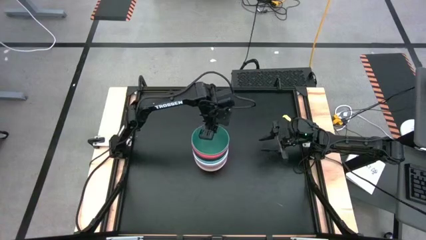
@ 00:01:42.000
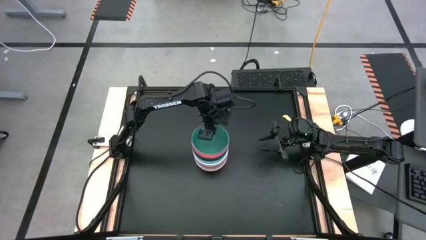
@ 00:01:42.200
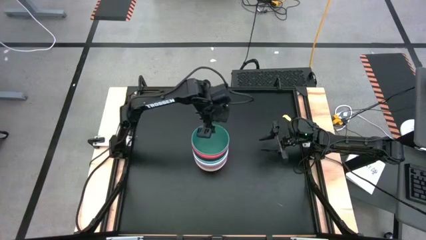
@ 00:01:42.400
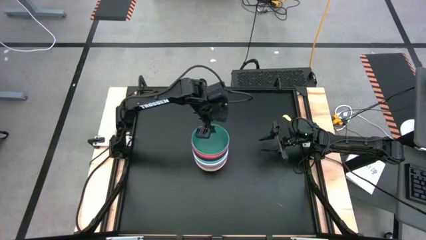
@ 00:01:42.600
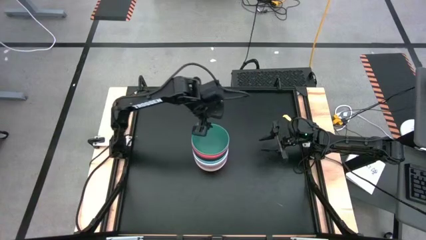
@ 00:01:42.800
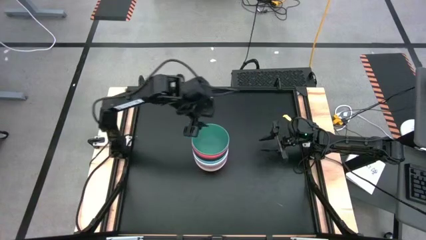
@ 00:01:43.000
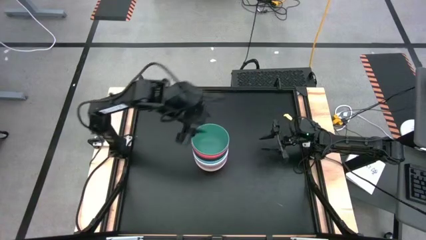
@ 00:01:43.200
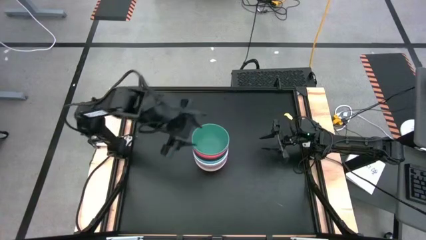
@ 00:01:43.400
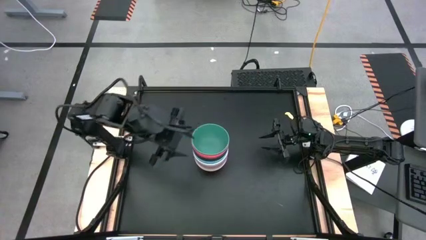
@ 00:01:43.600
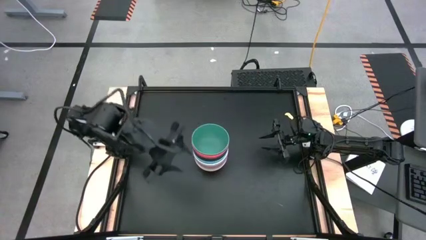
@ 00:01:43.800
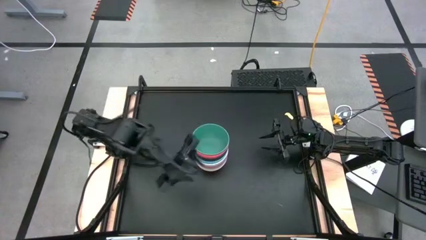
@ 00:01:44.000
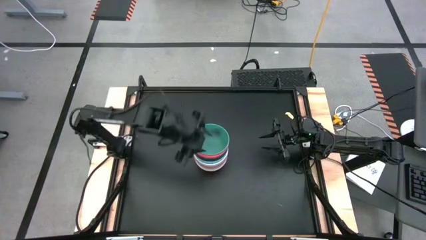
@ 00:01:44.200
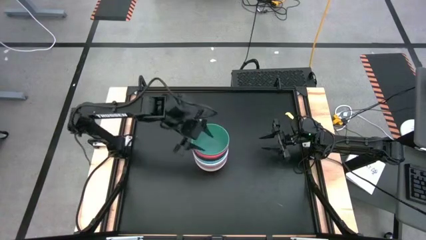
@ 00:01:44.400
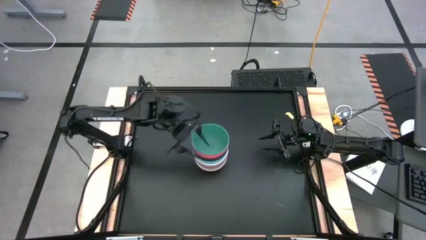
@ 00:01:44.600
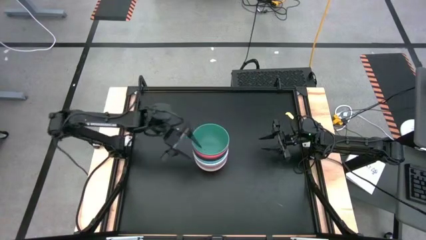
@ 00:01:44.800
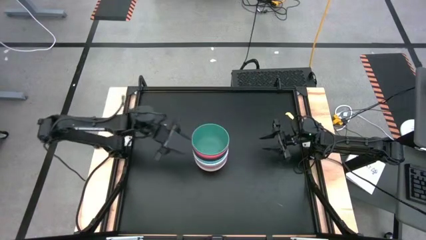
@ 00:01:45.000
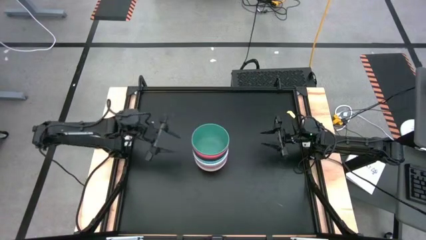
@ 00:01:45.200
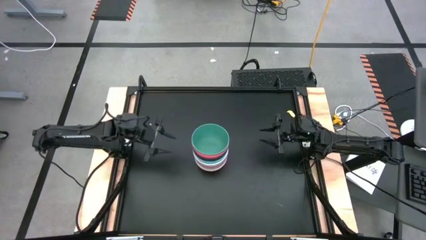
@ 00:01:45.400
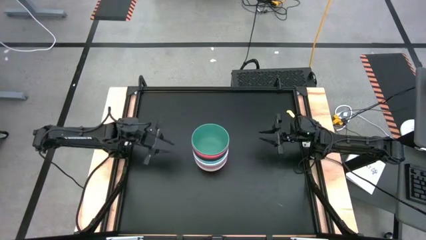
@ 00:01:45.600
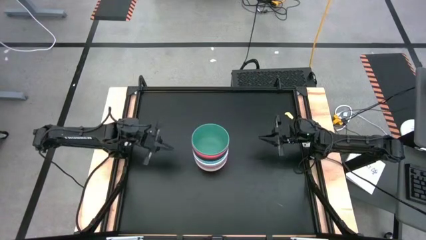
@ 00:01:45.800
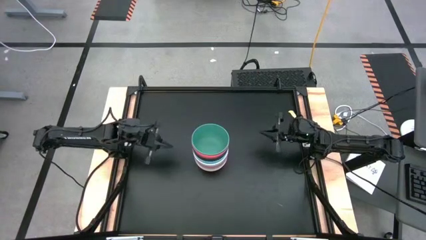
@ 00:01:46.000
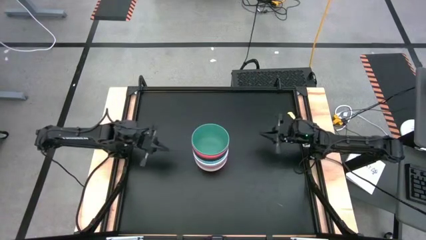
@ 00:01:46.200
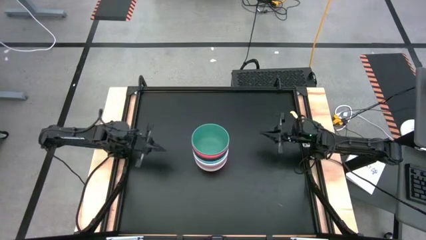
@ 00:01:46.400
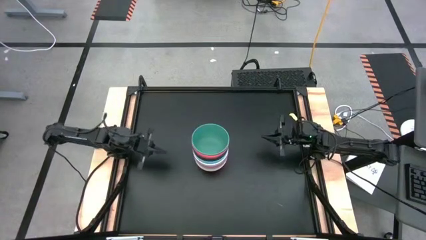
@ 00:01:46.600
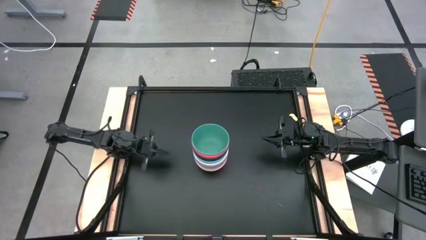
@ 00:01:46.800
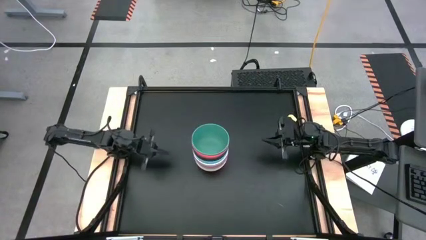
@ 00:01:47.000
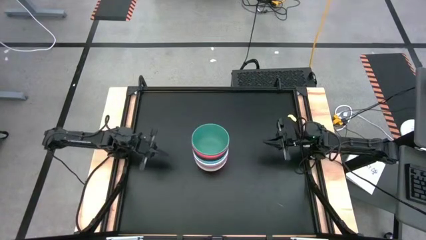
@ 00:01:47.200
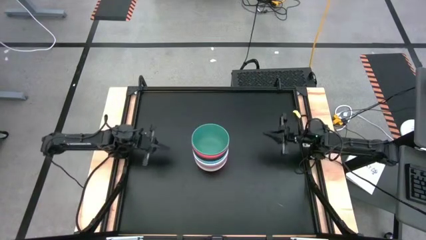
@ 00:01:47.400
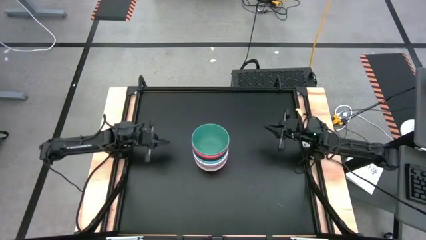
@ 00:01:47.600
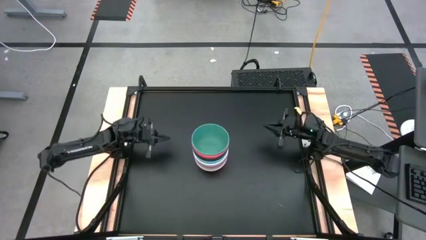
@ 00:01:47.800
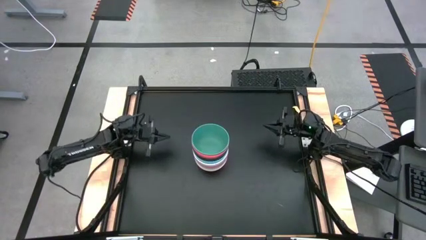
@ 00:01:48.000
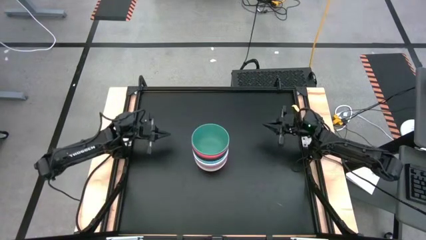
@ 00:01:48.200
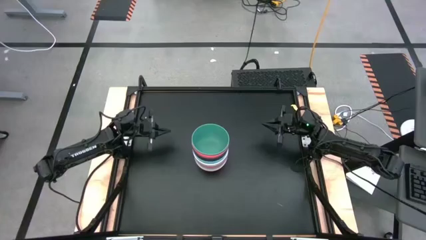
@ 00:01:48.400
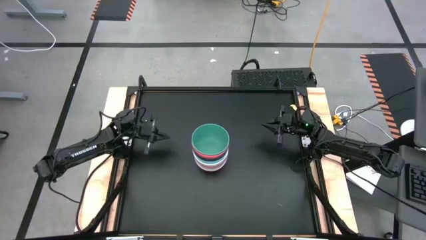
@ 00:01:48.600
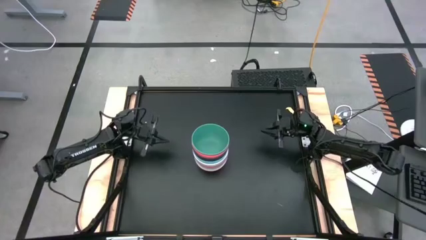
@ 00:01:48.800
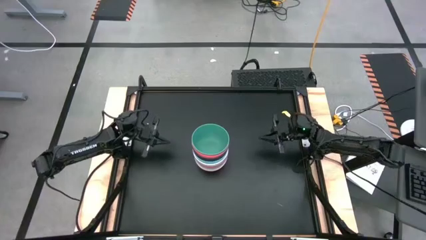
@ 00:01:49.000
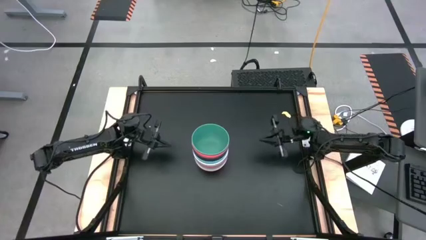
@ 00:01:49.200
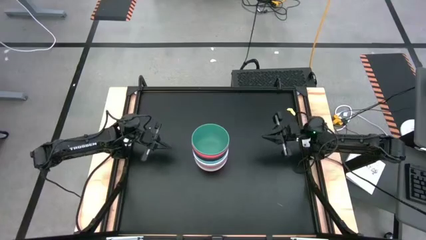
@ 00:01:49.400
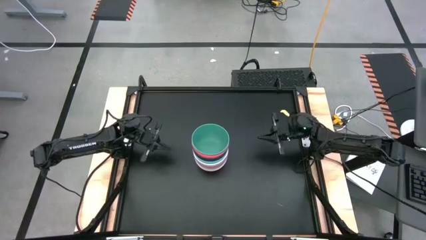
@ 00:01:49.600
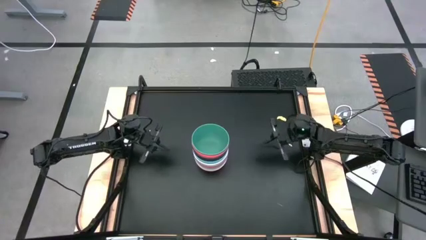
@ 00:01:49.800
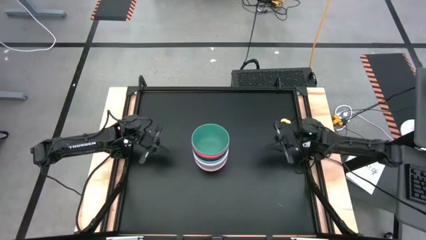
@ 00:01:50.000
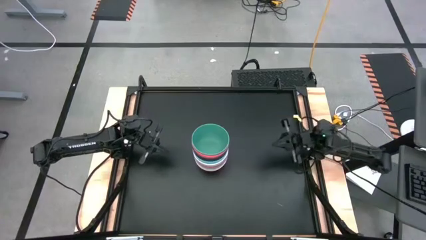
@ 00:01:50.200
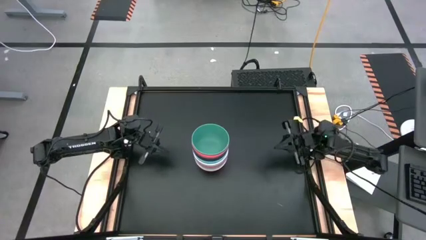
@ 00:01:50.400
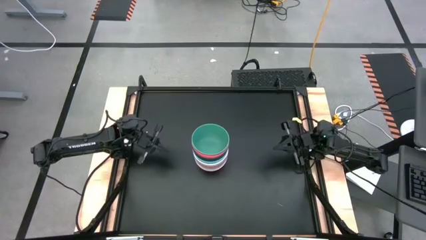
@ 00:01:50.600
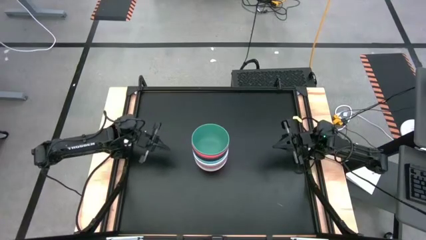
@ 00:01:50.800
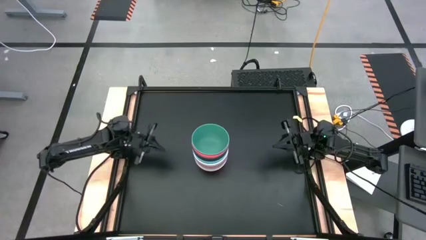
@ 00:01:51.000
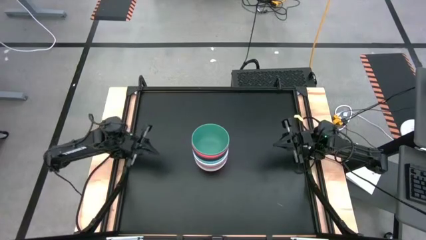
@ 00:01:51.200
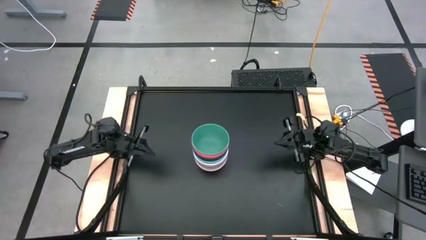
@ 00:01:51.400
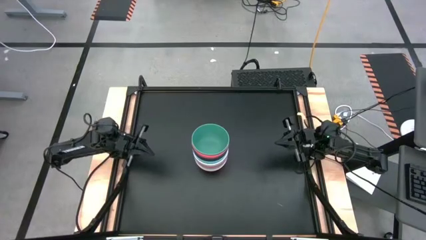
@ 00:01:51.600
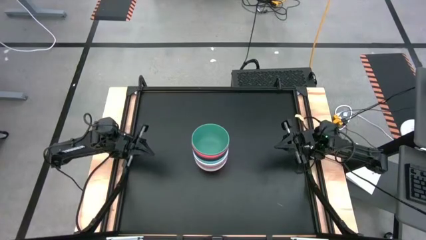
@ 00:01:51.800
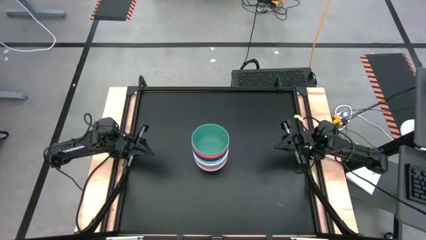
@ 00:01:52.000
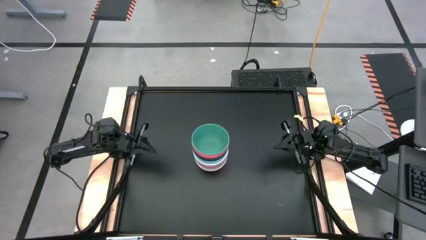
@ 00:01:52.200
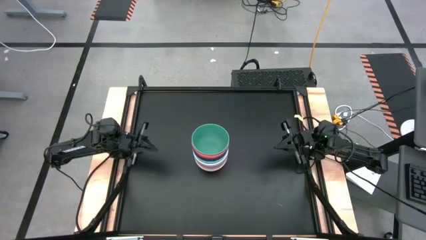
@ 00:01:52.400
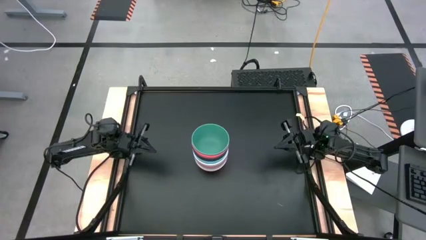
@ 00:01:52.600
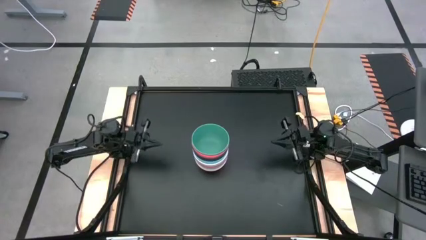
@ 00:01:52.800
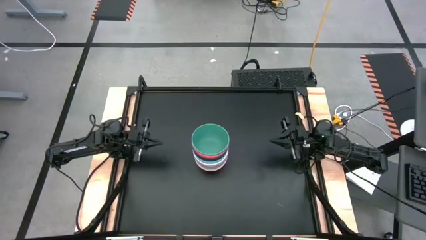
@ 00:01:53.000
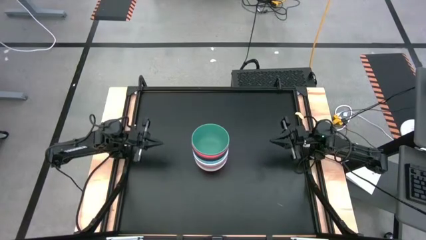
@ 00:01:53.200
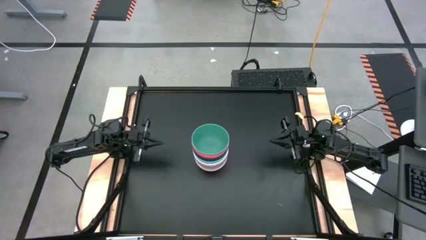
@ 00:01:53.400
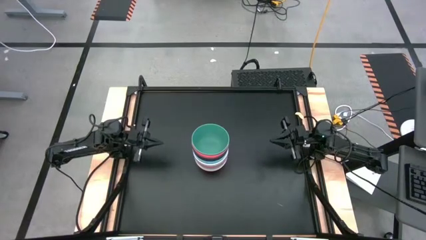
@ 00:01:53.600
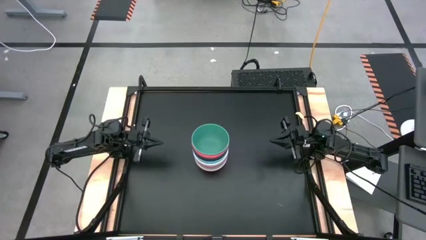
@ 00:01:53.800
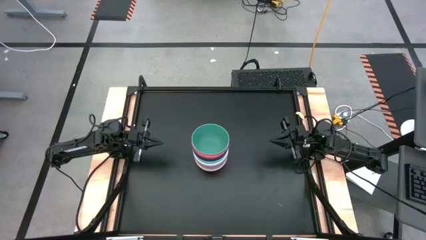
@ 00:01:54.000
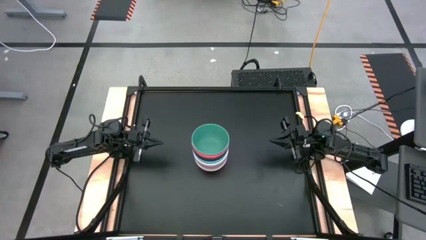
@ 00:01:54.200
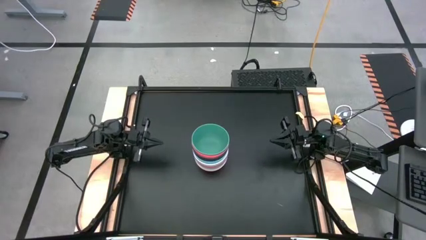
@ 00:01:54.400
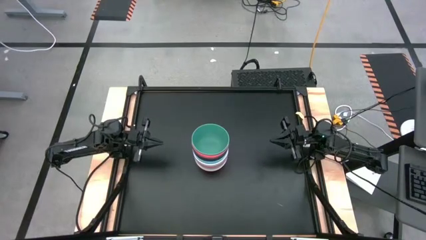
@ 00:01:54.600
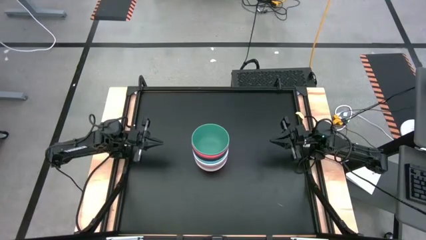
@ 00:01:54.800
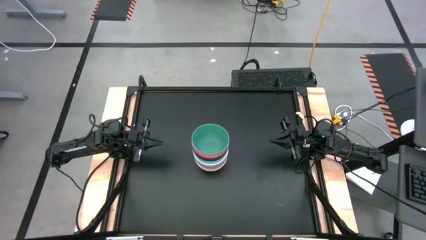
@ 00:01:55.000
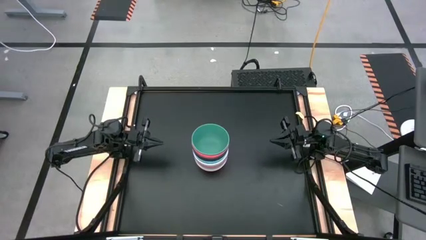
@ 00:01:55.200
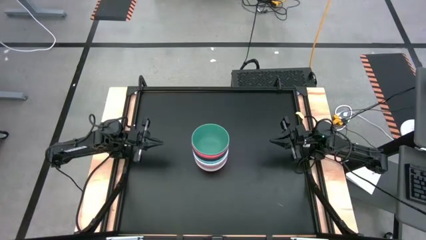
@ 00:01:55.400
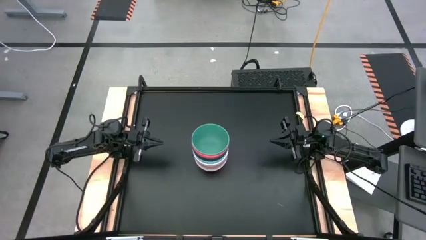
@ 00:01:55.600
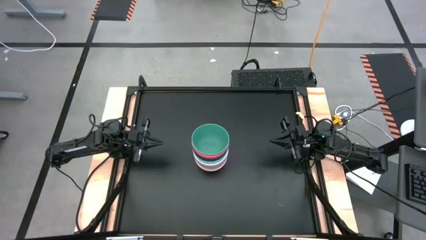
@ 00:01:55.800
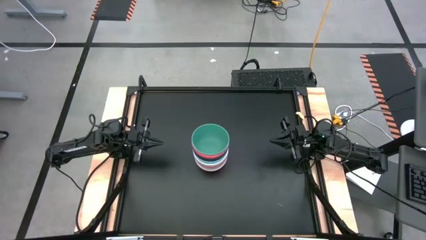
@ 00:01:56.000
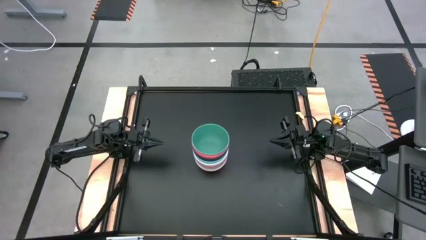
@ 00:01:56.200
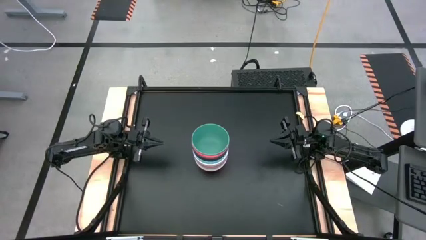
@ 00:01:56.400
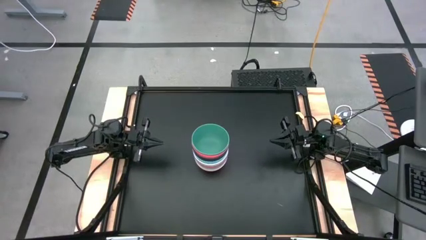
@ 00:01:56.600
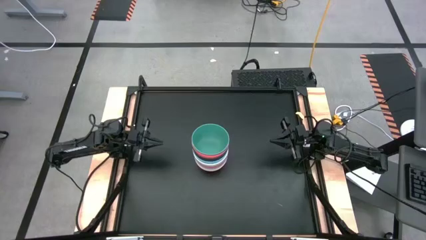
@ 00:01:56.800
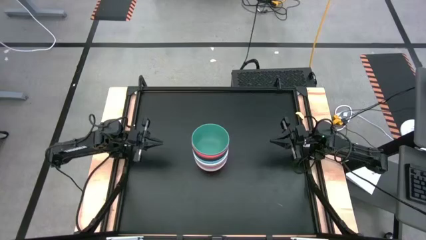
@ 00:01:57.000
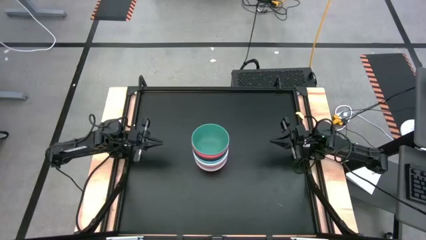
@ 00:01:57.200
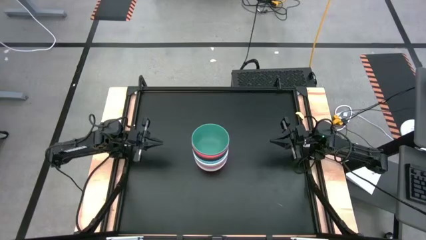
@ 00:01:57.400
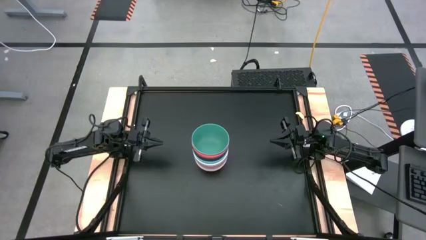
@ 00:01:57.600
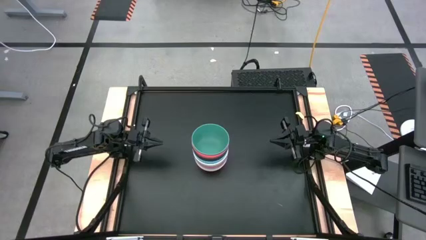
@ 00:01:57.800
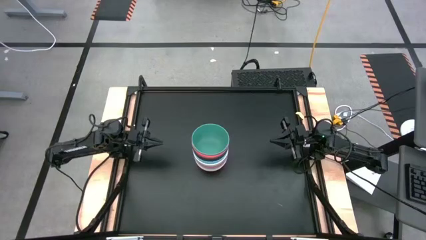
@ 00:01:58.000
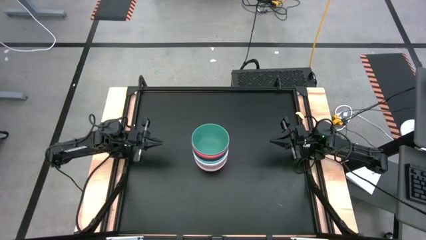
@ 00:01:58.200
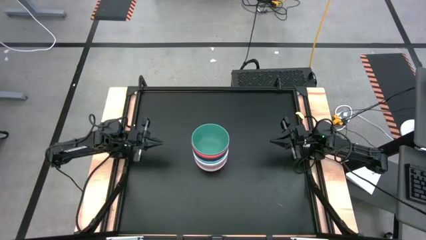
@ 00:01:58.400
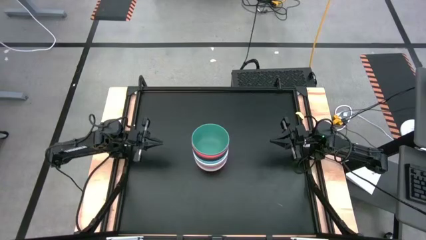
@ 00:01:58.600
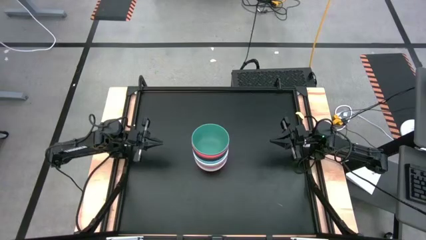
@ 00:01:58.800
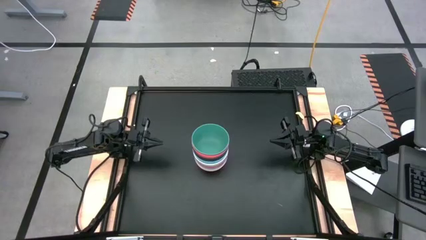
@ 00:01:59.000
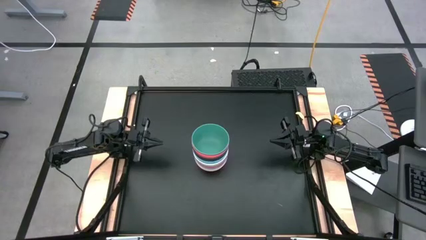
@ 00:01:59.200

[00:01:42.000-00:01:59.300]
Task: Nest bowls inside each other
Return to Home Position
